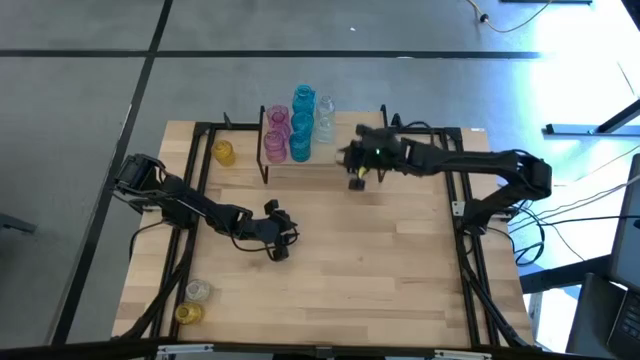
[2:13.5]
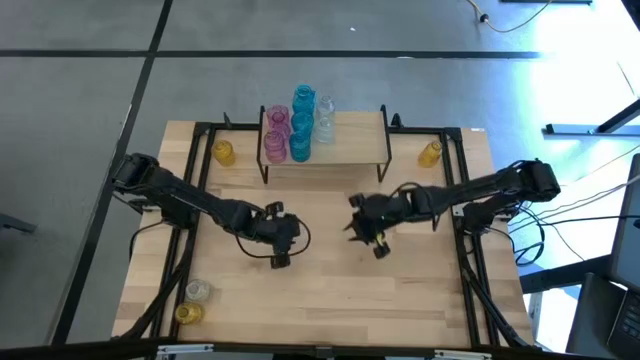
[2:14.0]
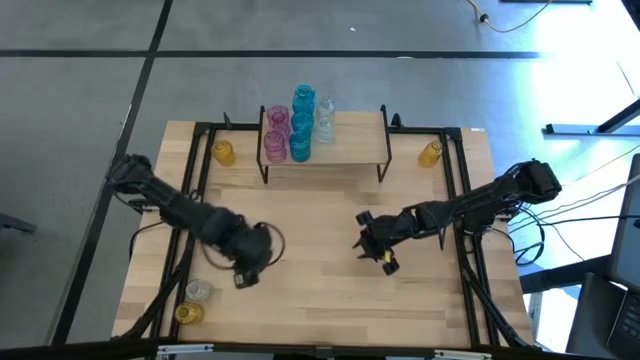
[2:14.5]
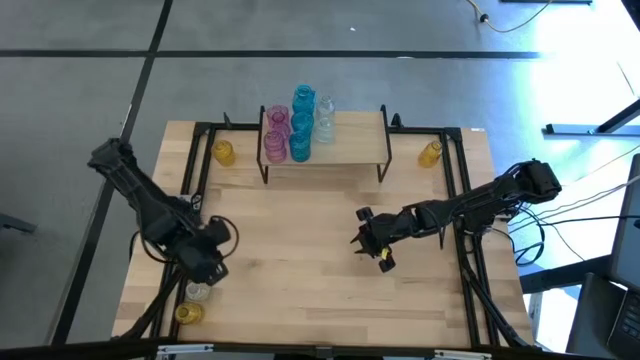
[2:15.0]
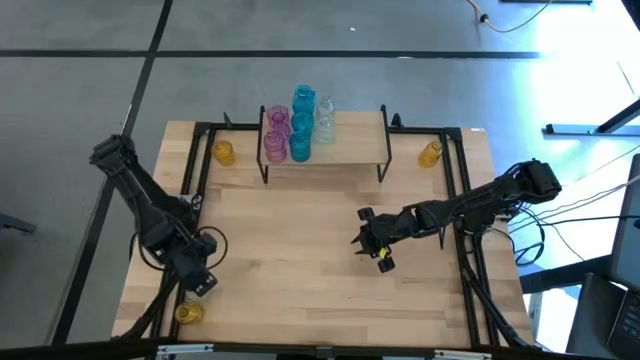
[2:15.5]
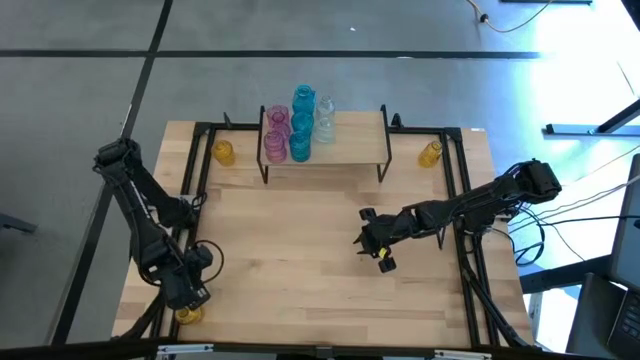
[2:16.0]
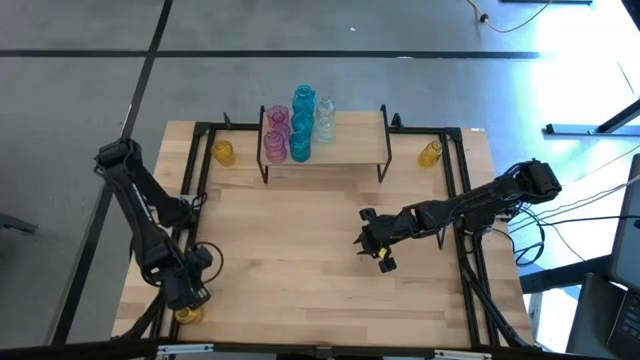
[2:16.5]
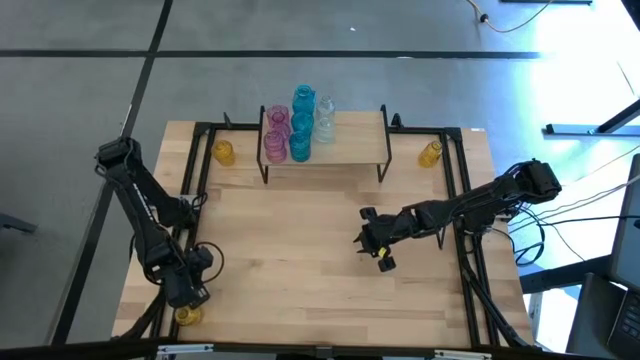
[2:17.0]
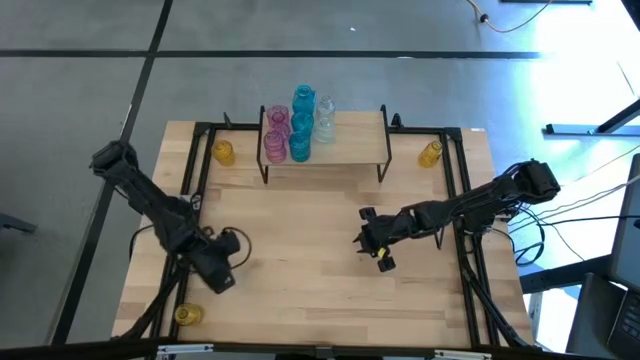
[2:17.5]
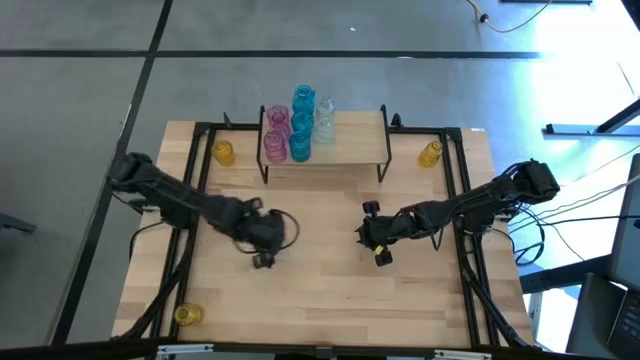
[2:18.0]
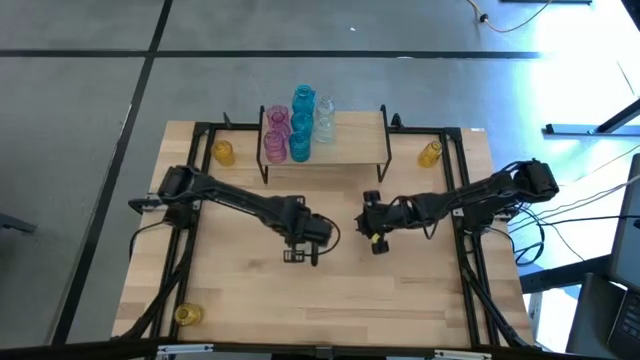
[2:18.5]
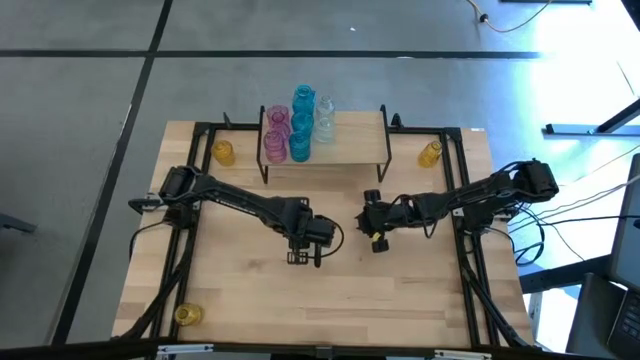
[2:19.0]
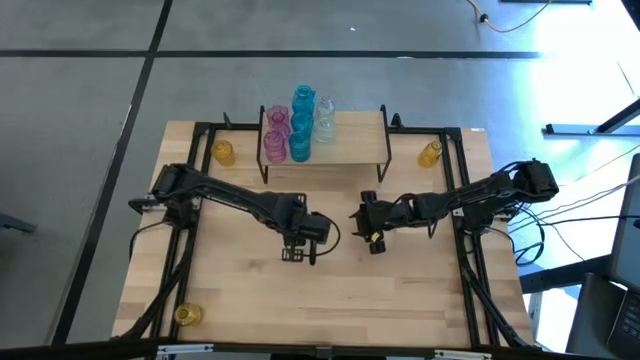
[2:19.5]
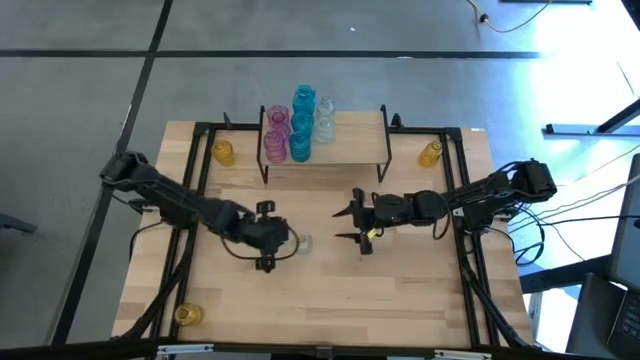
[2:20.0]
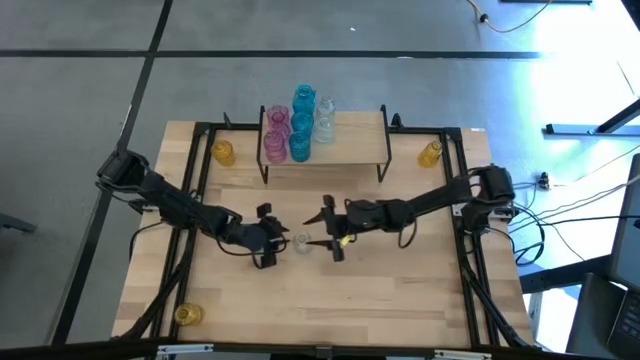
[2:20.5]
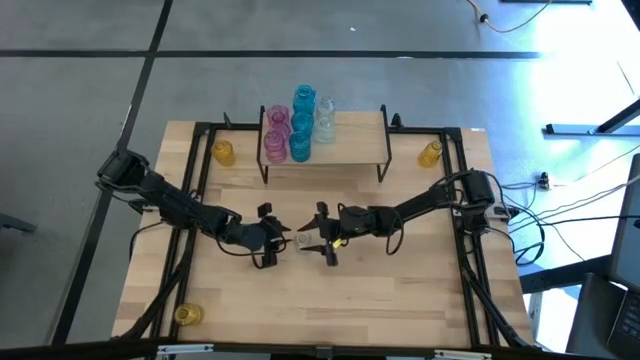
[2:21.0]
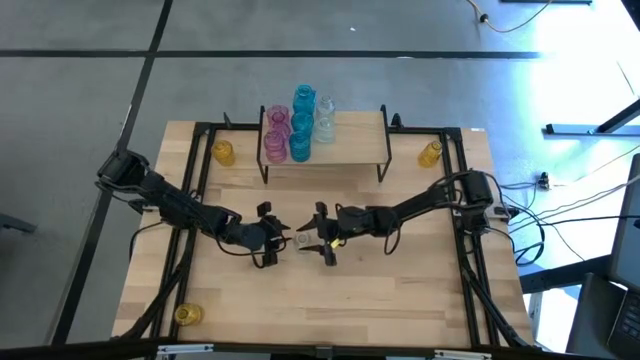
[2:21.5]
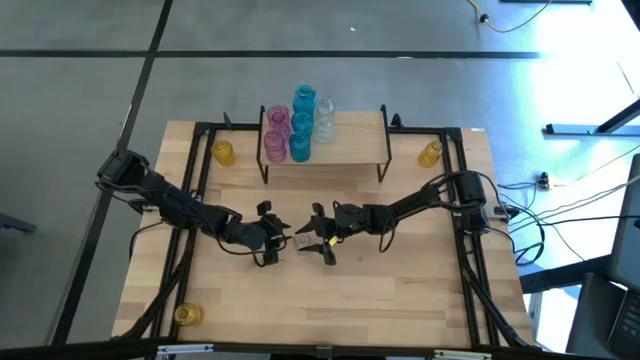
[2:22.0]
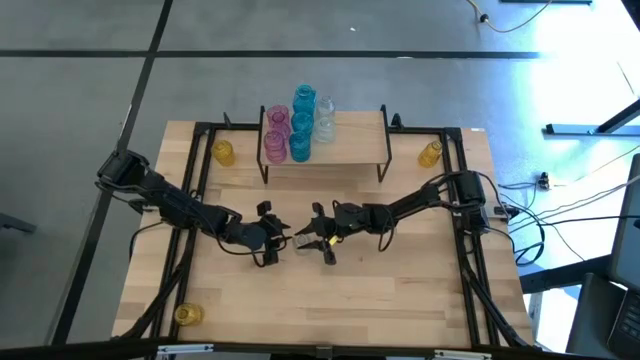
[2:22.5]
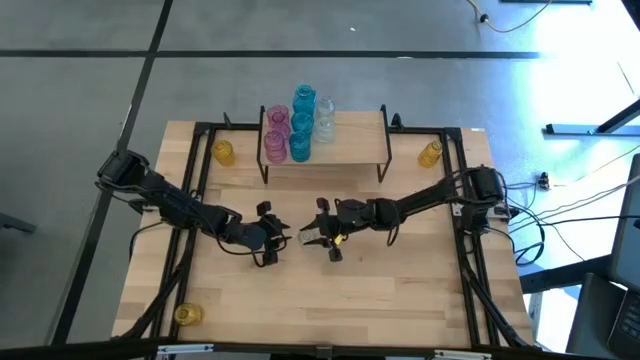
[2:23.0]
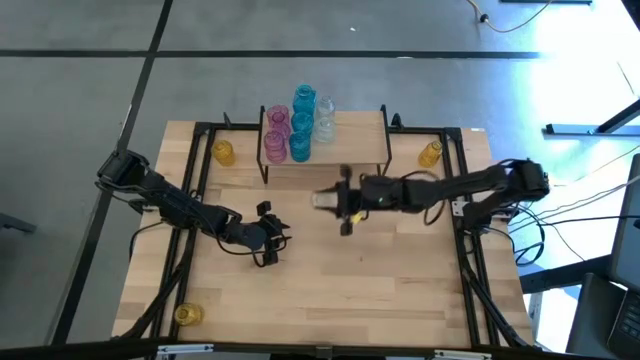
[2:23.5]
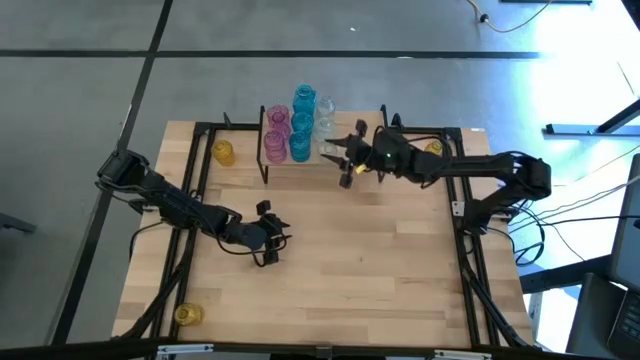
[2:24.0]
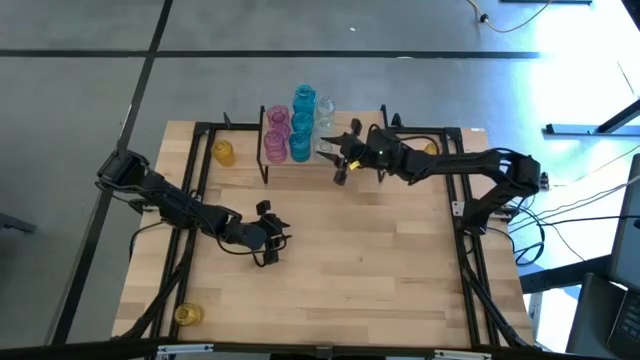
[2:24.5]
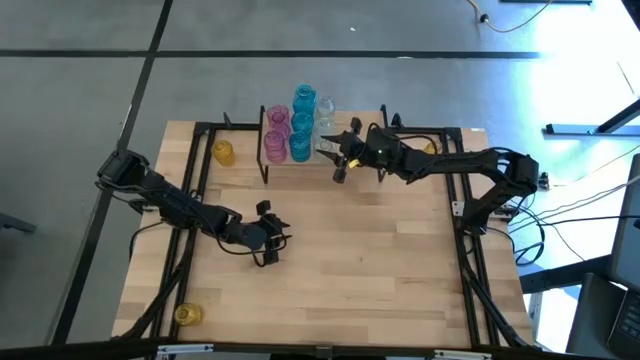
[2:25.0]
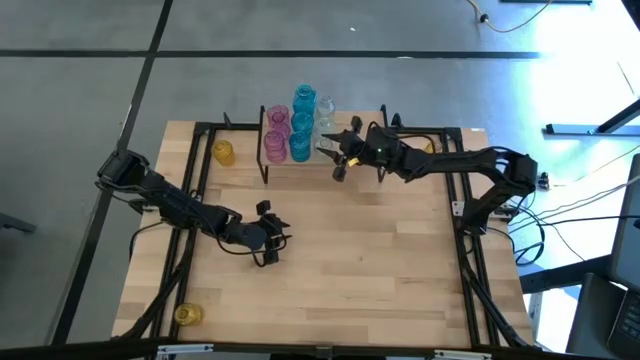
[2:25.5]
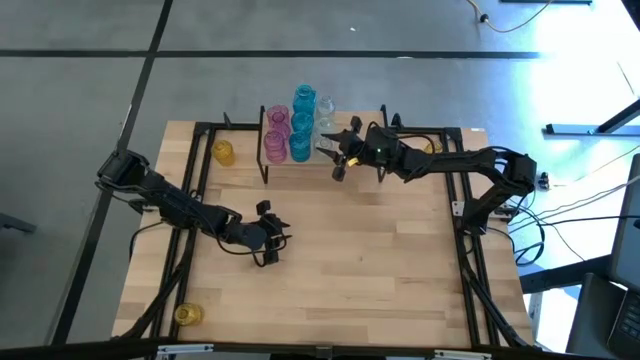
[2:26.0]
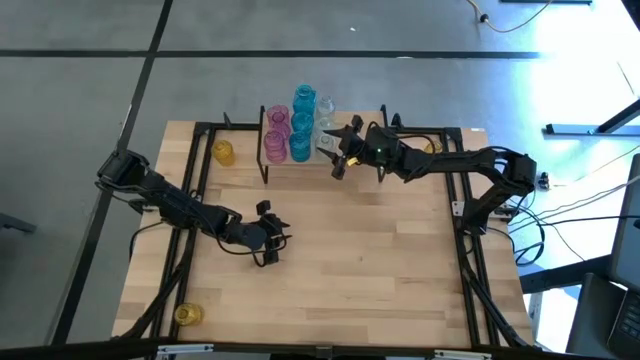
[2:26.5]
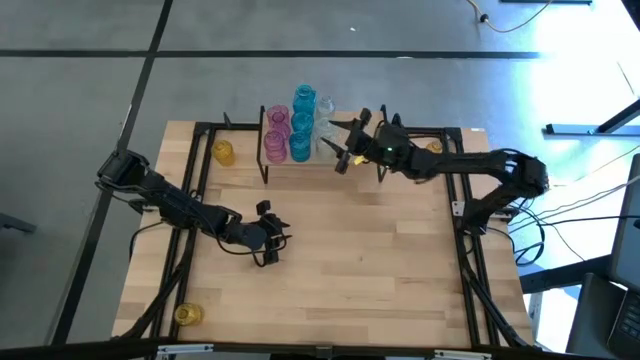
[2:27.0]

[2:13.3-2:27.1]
Task: sort vases onto shelf
Put the transparent flower vase on the shelf aligned with the other transparent flower vase

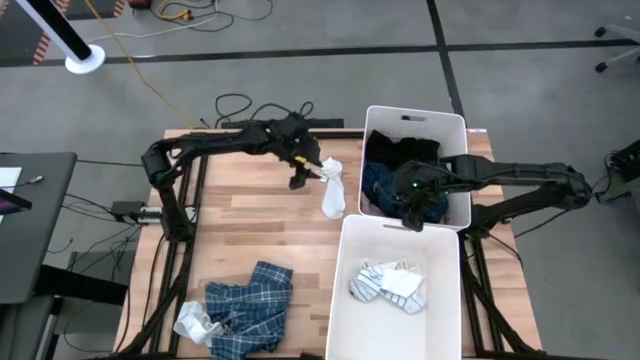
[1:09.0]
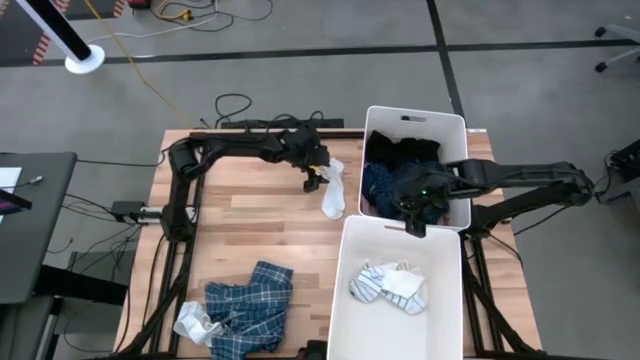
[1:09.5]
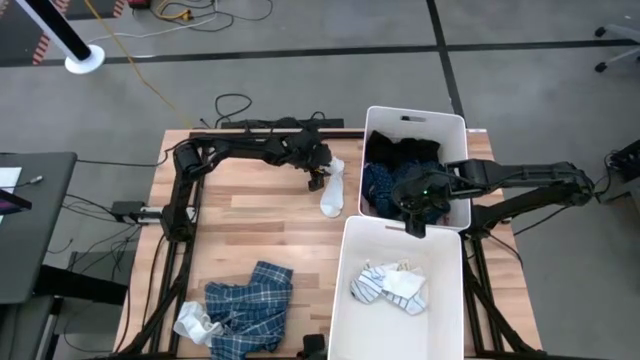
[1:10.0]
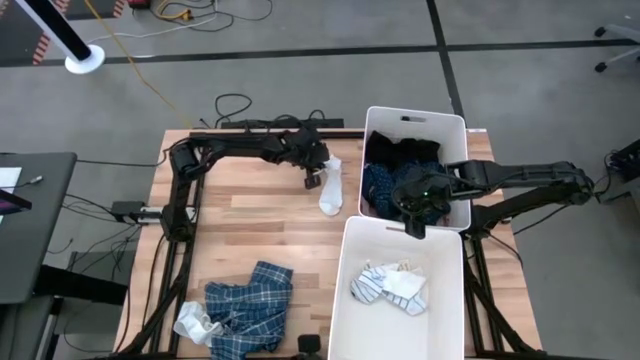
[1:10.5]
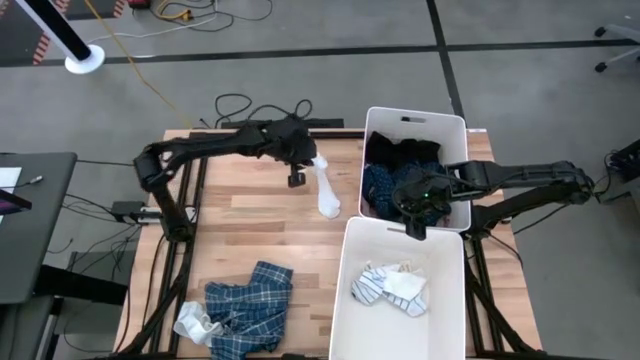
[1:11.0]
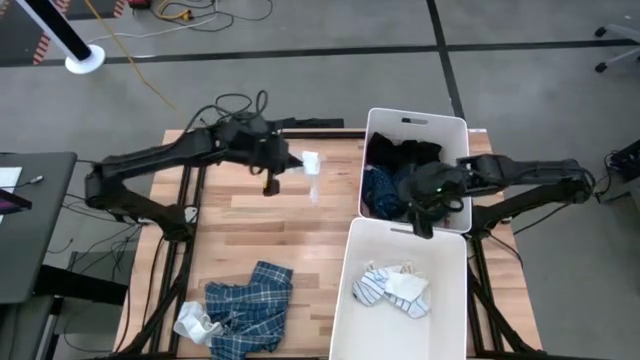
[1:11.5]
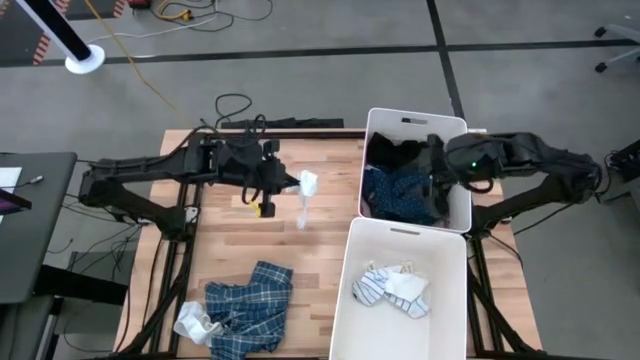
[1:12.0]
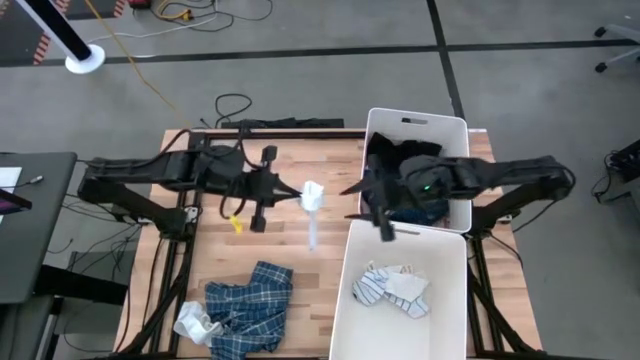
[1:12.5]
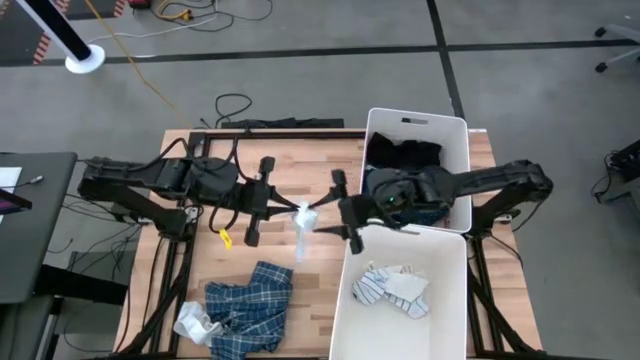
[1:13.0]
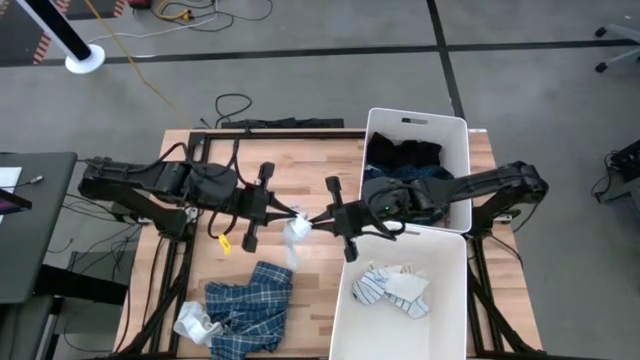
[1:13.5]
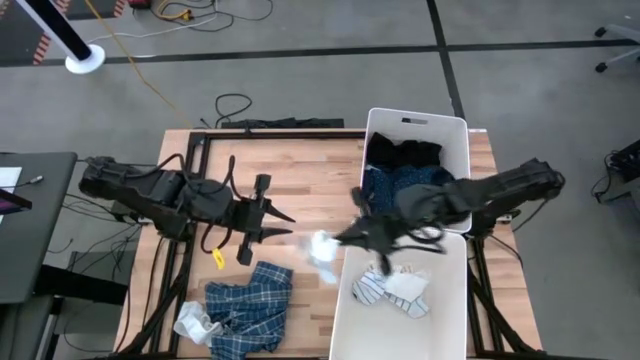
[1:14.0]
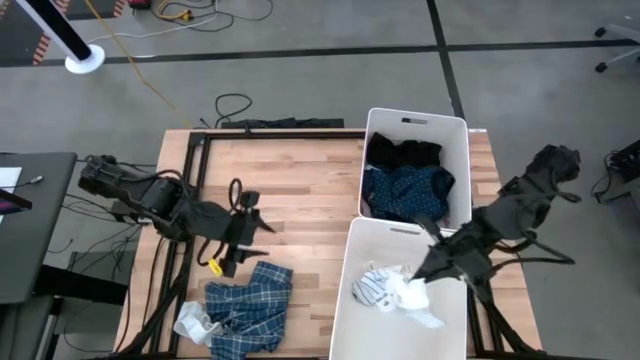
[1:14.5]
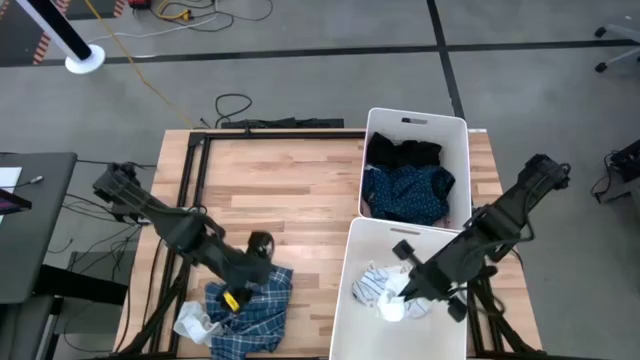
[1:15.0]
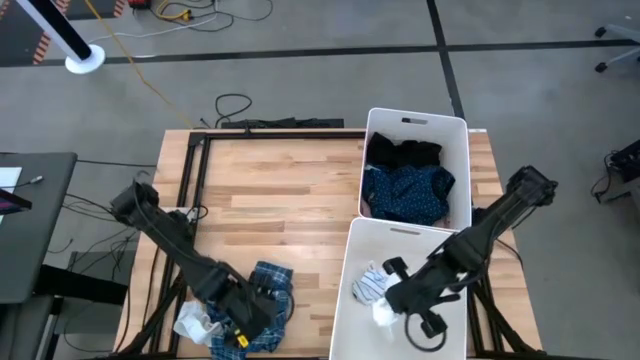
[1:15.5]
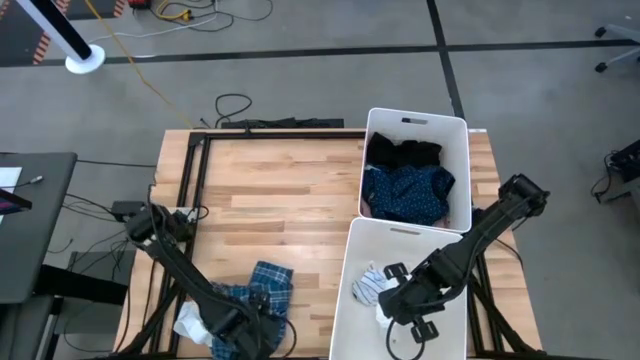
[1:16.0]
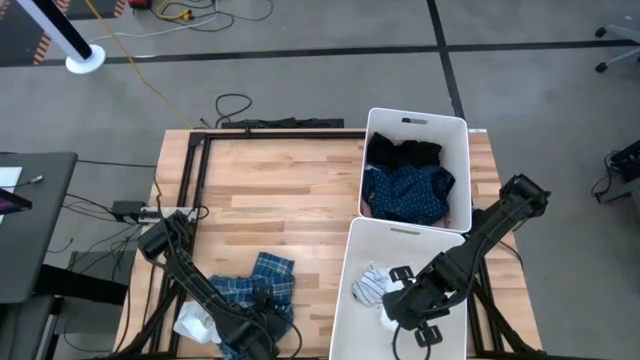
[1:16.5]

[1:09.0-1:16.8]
Task: Sort clothes
Put the top white sock into the bottom laundry bin
